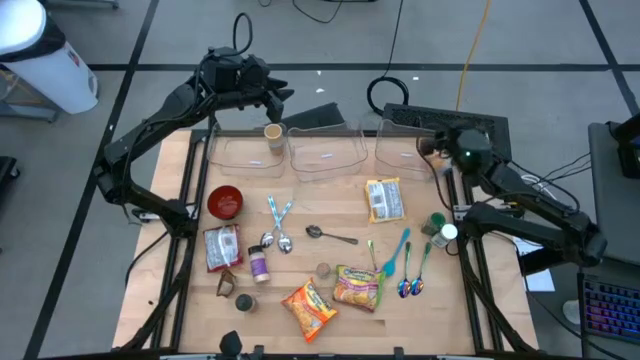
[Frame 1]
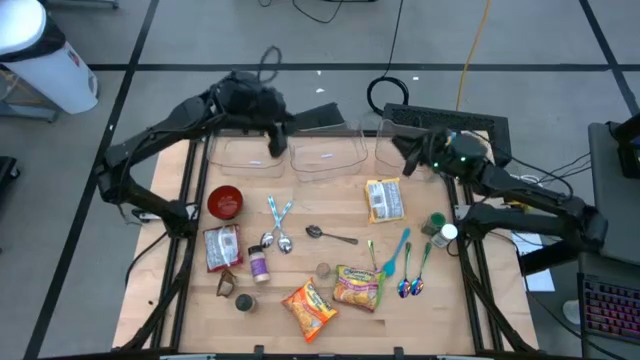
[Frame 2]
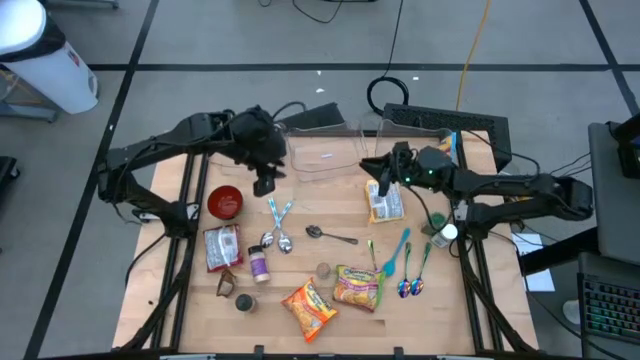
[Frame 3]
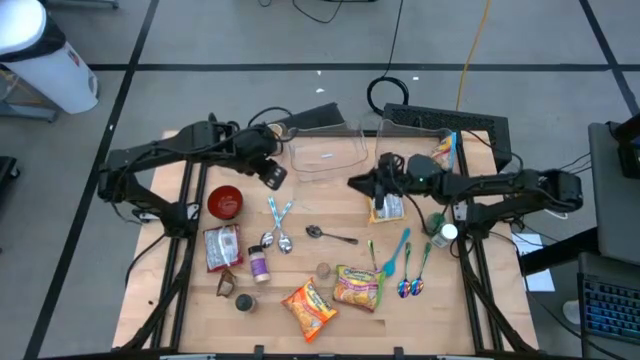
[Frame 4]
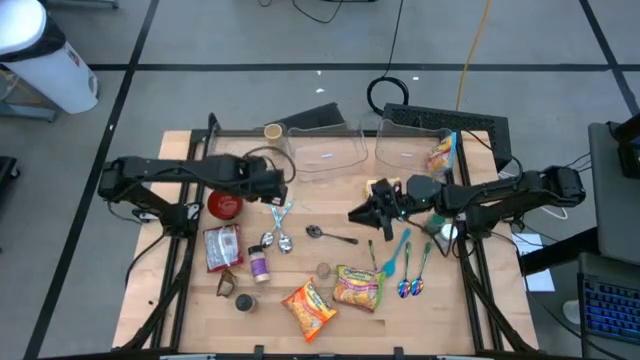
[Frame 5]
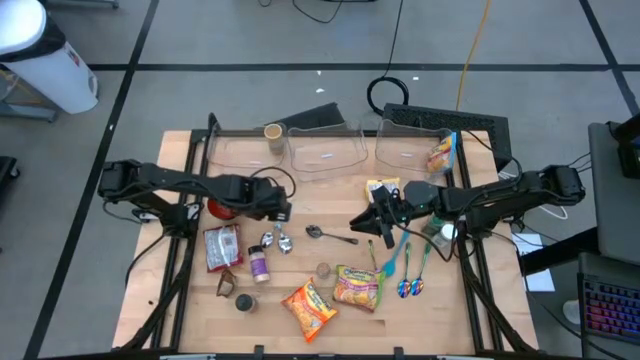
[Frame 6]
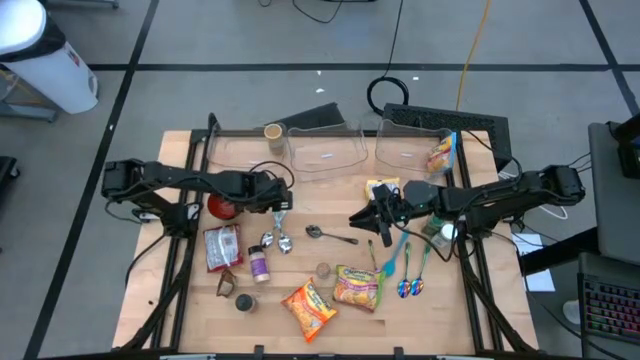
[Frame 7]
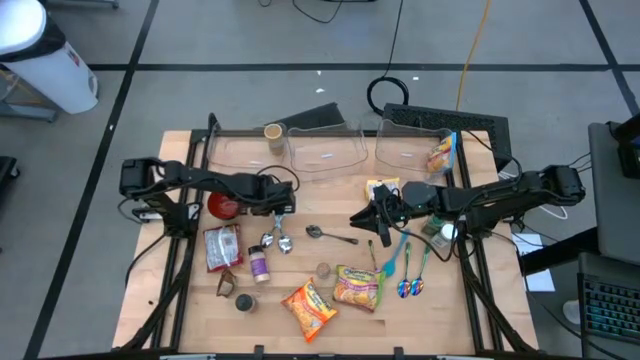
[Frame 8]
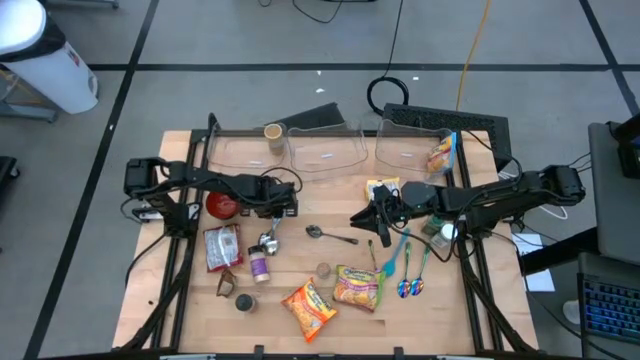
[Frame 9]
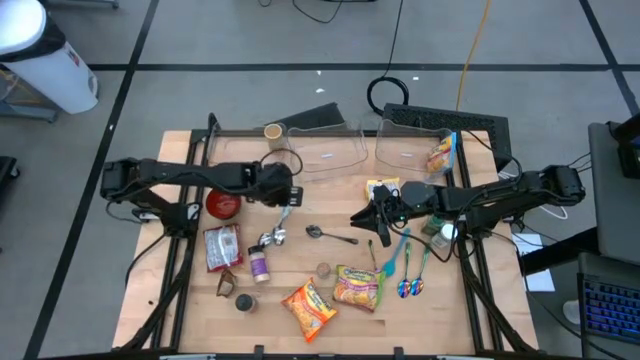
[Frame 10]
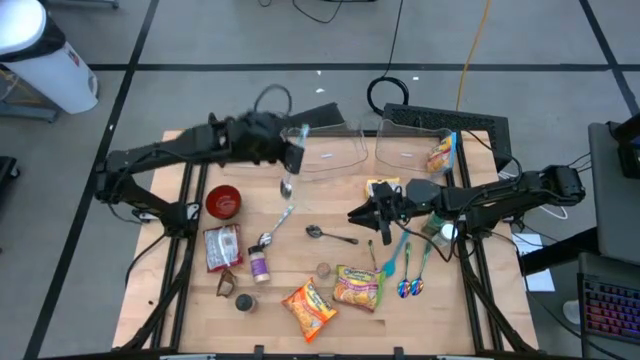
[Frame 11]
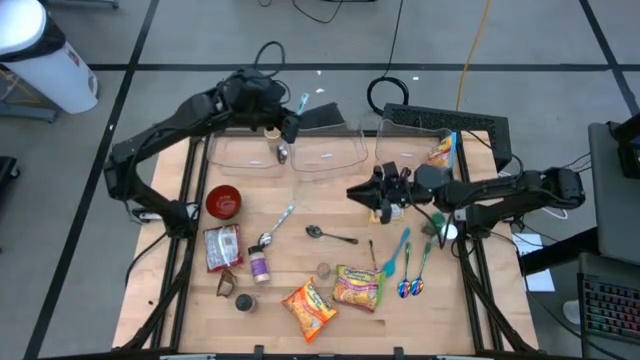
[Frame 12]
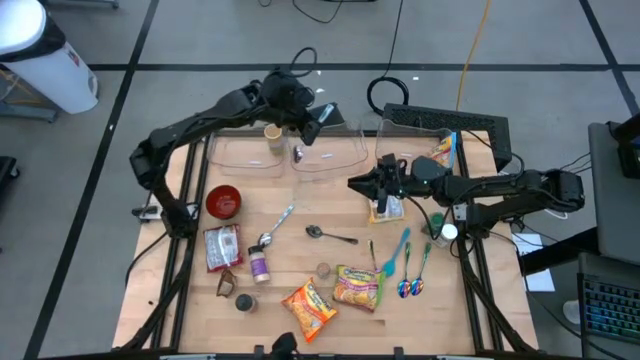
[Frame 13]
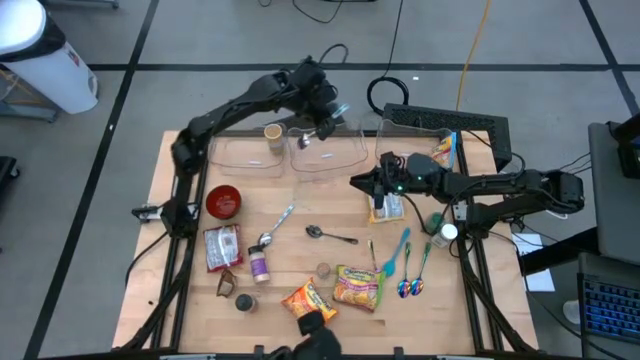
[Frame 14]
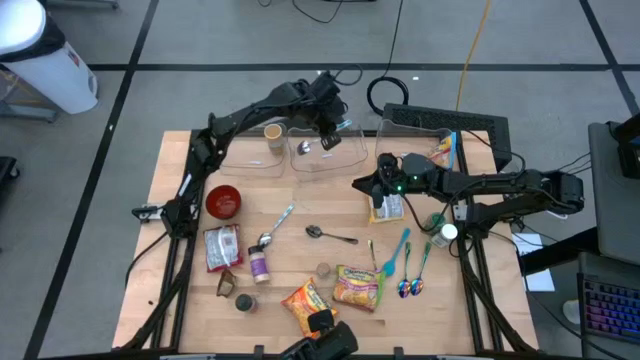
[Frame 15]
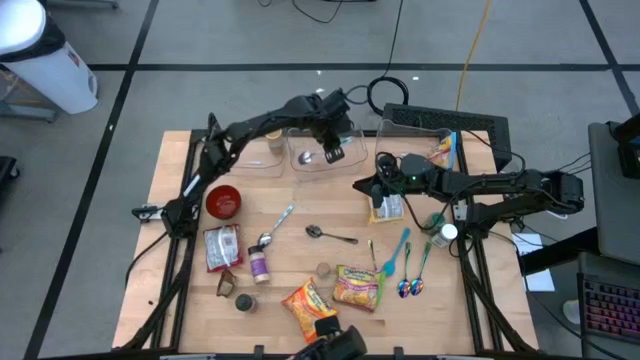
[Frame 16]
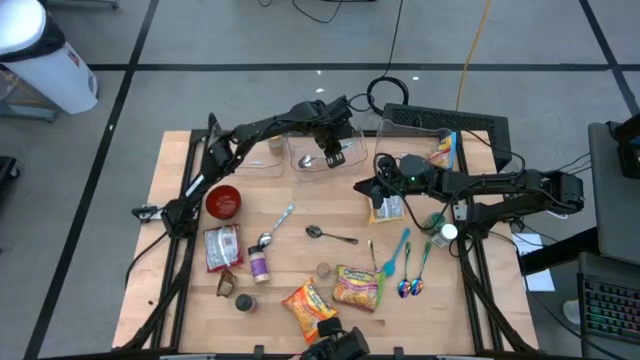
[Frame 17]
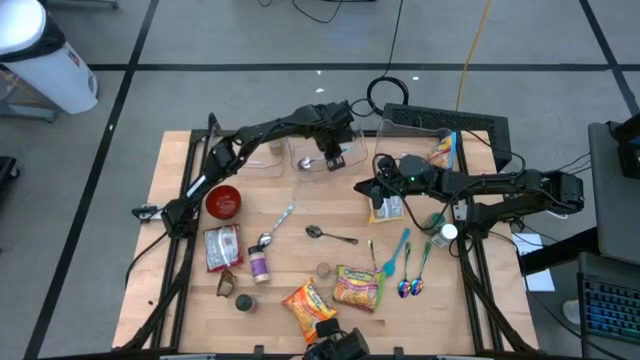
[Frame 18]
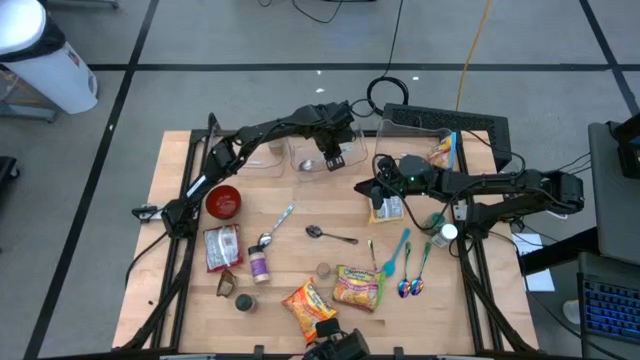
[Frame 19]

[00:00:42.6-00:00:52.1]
Task: Pick & Place Food Item
Put the right blue patterned spoon into the middle transparent bin

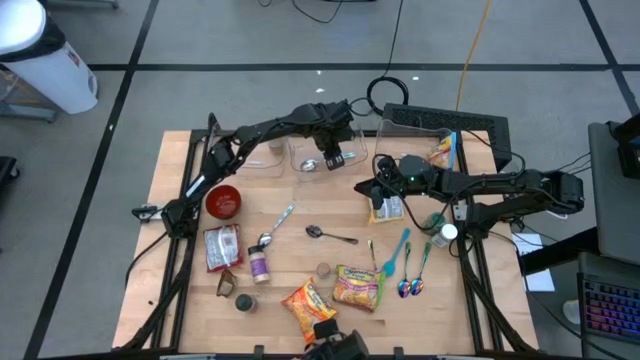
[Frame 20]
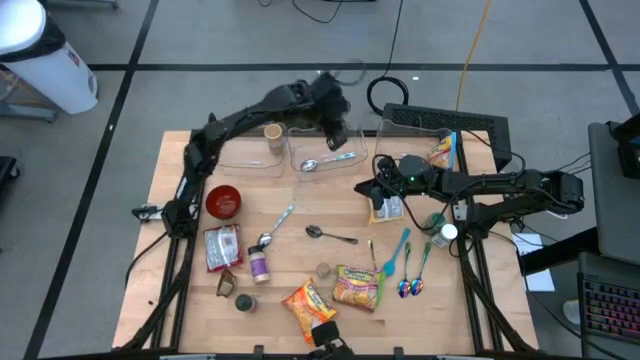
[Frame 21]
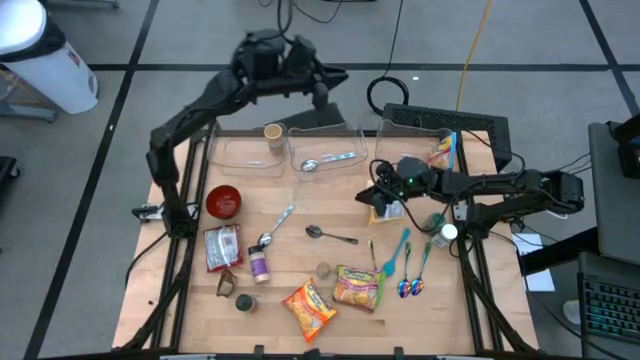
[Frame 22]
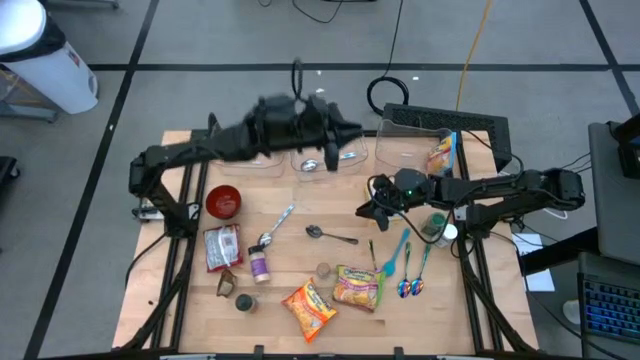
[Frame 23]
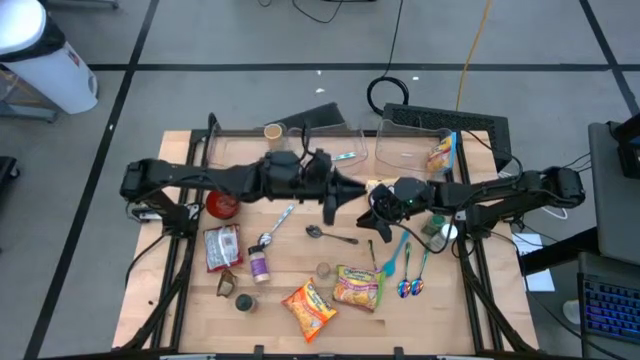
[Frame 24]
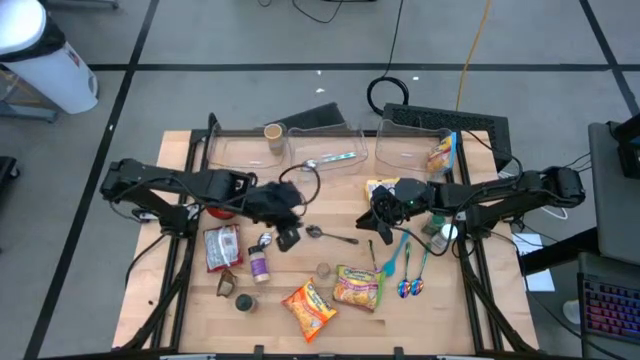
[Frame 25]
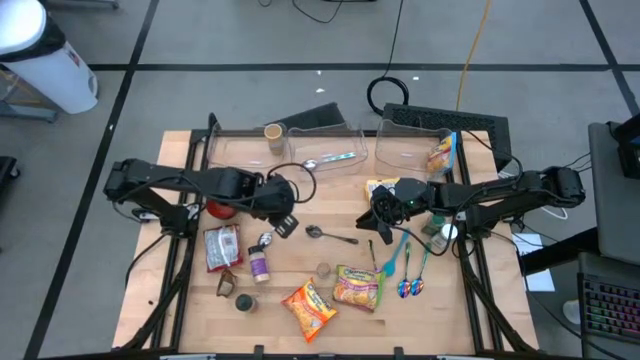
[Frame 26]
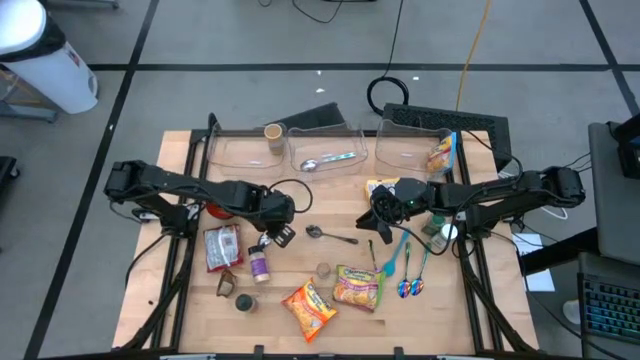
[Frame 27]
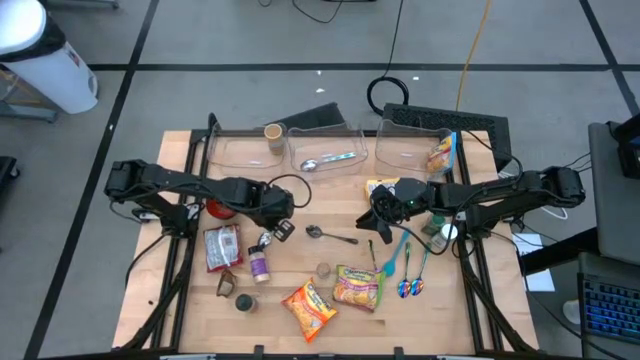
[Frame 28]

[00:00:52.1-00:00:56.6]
Put the blue patterned spoon into the middle transparent bin

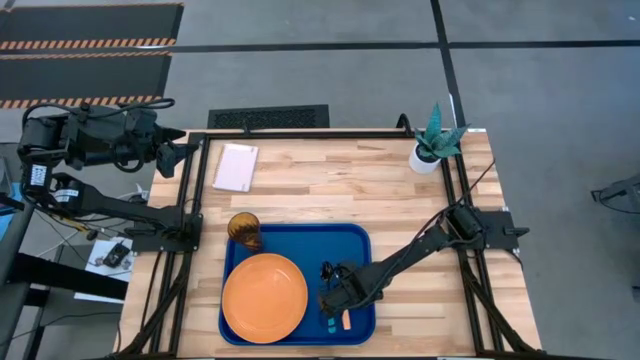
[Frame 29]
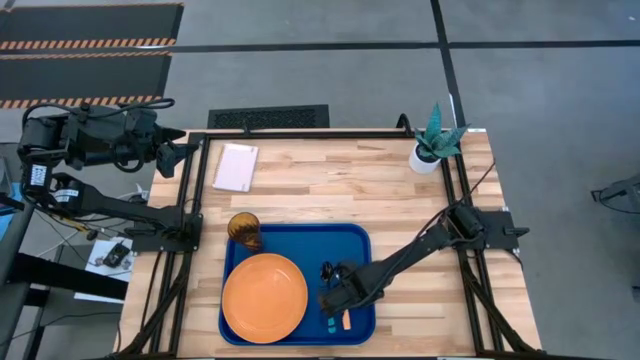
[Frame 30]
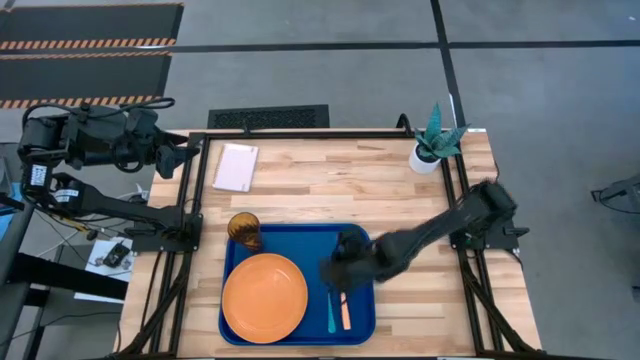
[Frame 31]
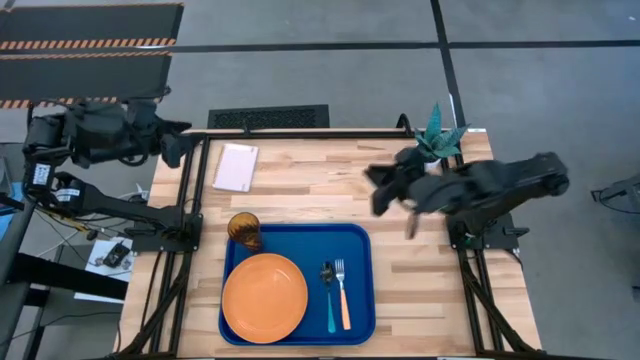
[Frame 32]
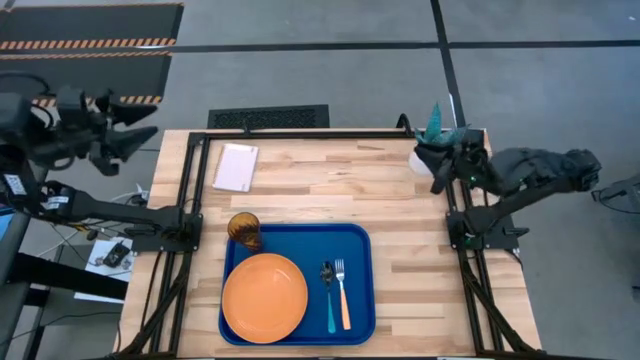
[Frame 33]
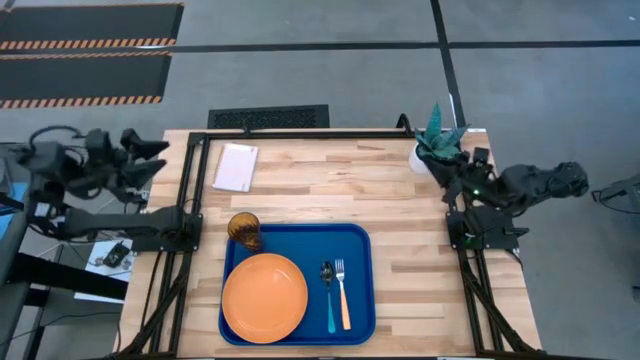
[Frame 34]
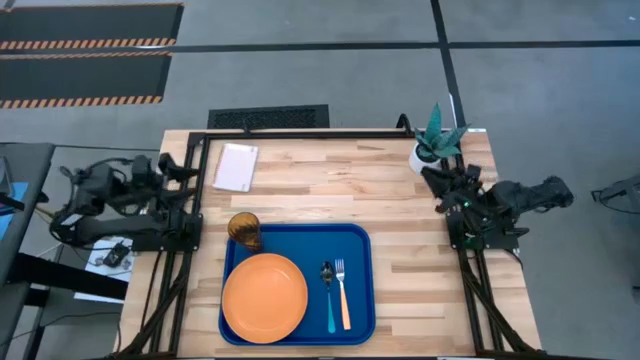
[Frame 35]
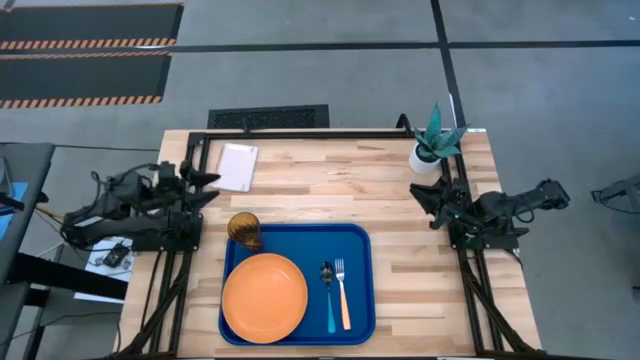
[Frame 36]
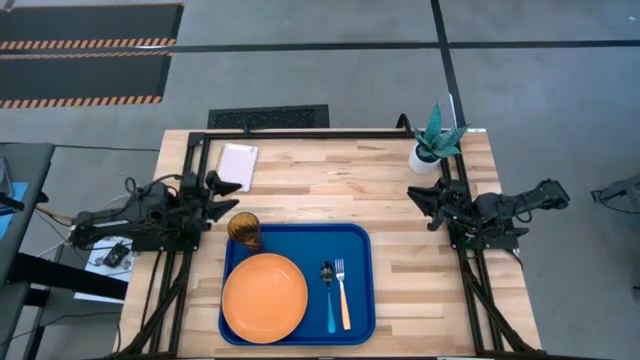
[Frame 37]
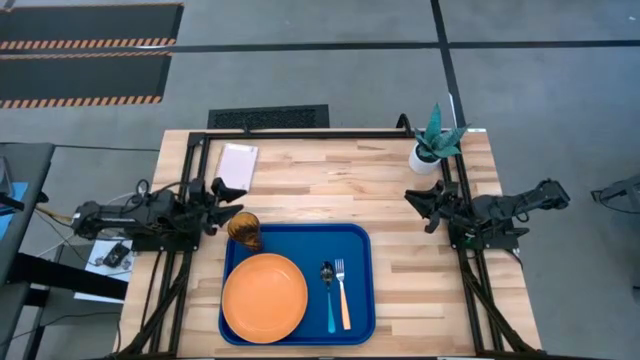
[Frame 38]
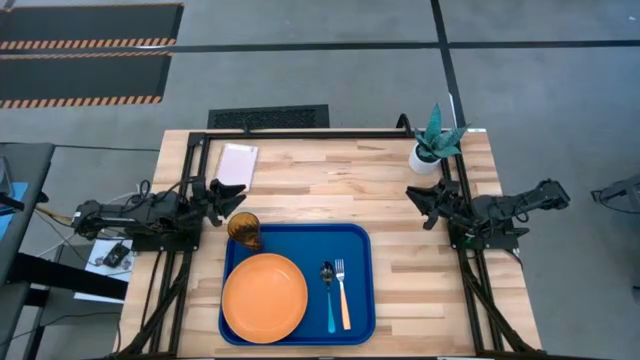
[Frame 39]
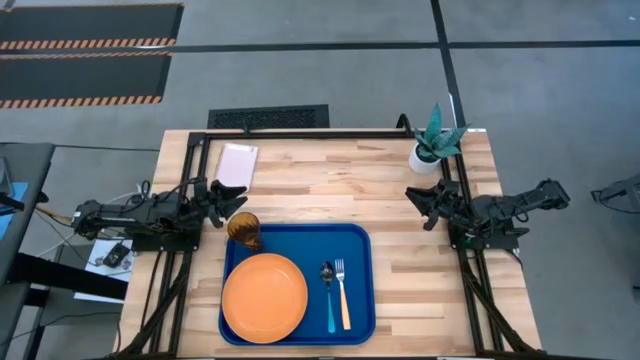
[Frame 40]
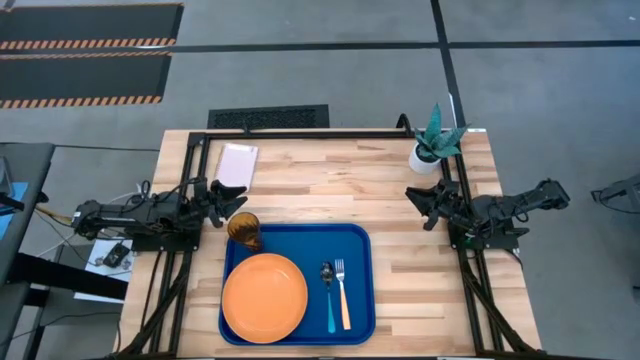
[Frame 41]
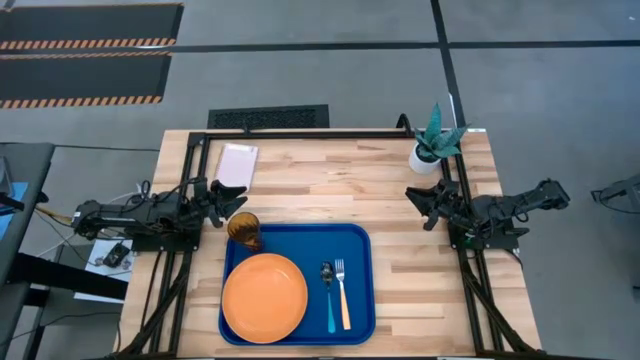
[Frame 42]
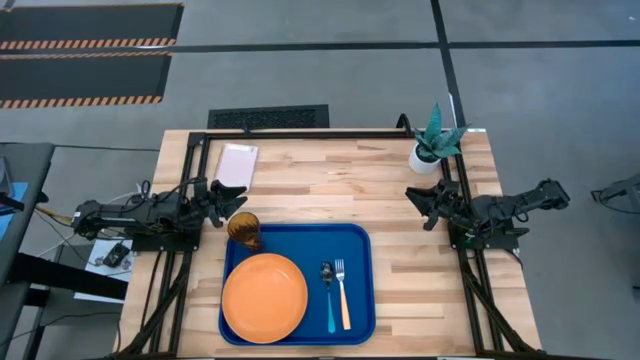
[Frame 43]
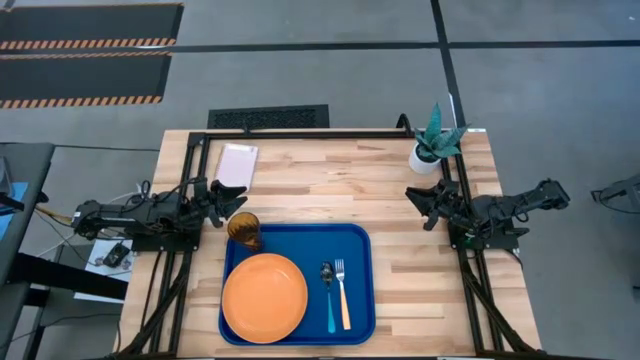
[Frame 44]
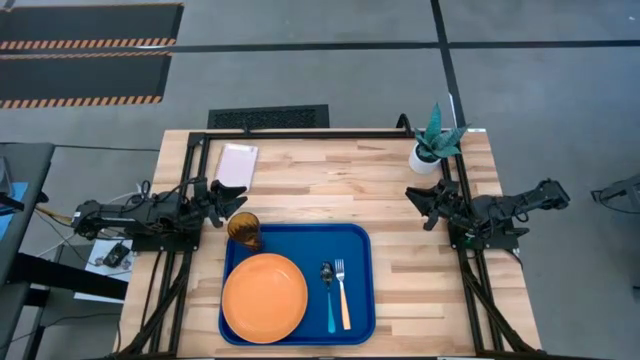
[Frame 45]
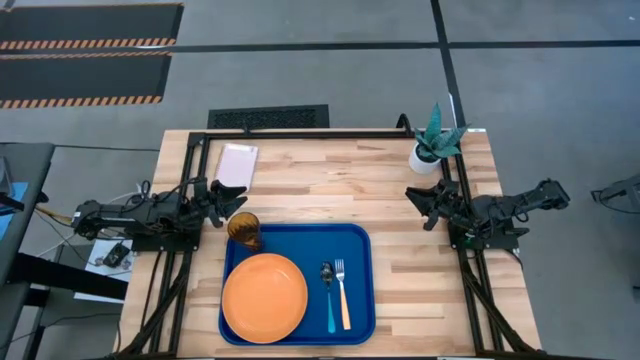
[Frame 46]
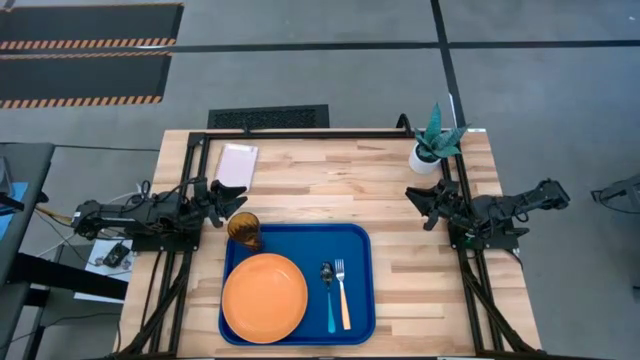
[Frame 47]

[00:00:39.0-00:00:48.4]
Task: Pick and place plate/cup/fork/spoon on tray
Return to Home Position
